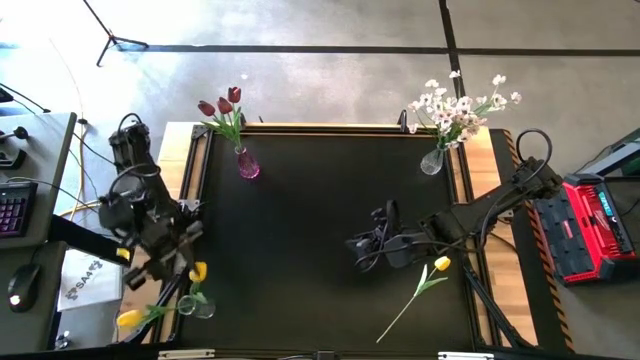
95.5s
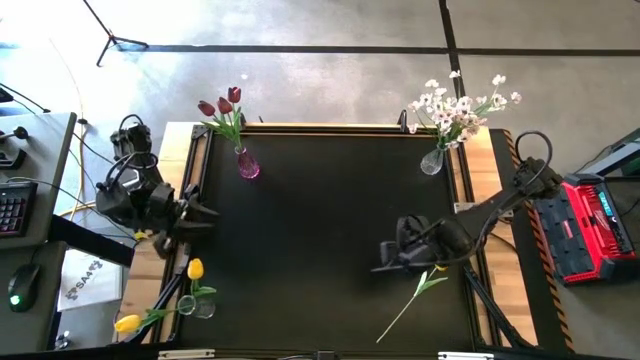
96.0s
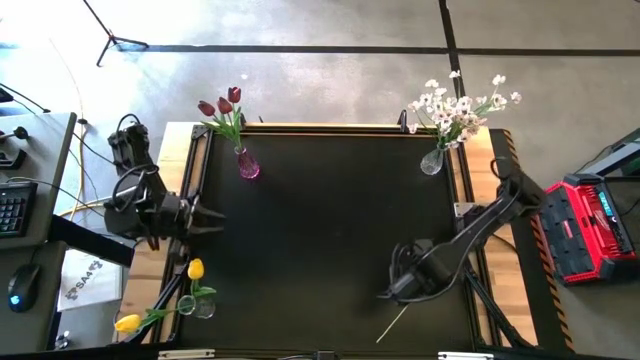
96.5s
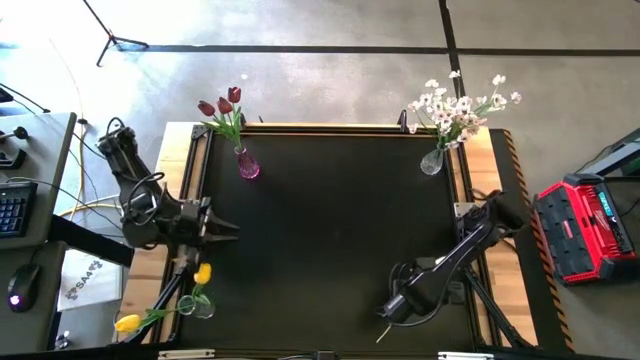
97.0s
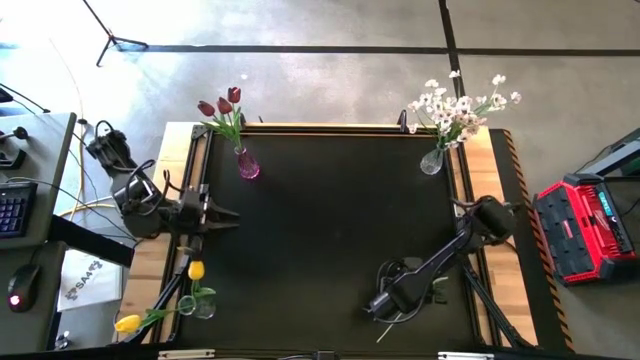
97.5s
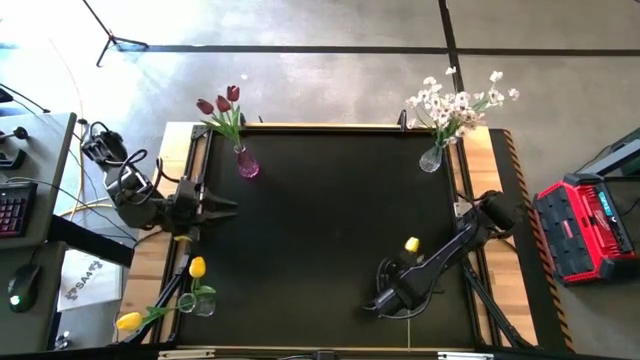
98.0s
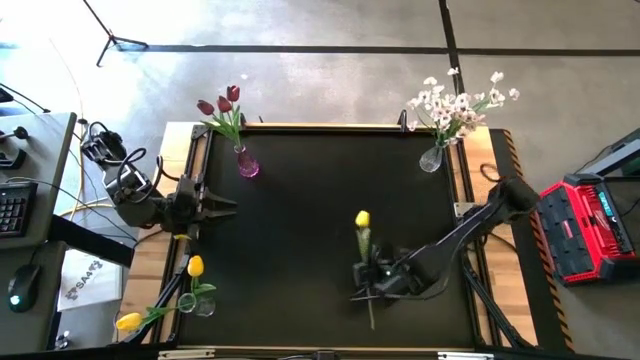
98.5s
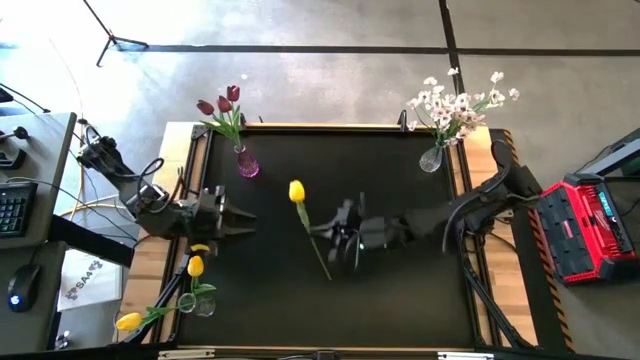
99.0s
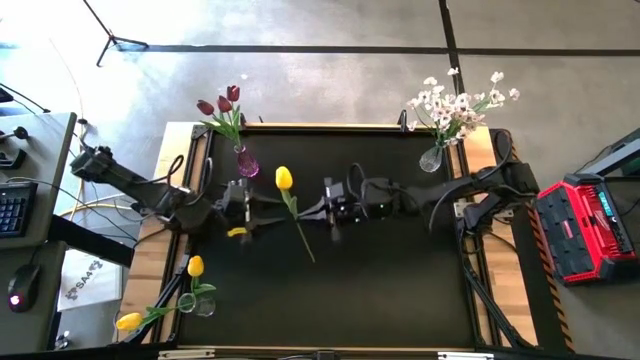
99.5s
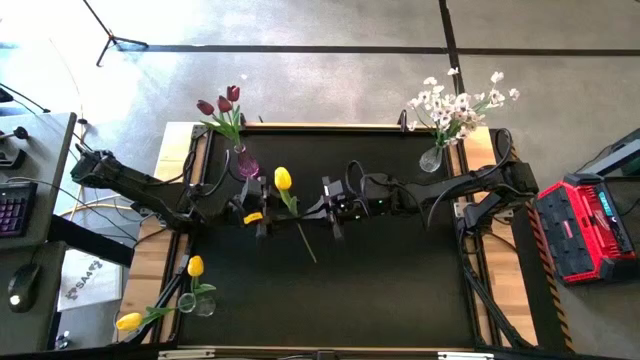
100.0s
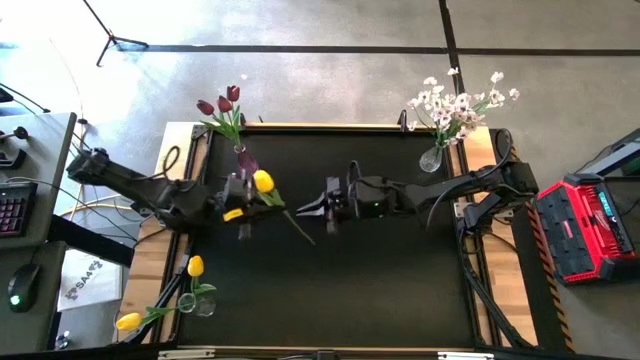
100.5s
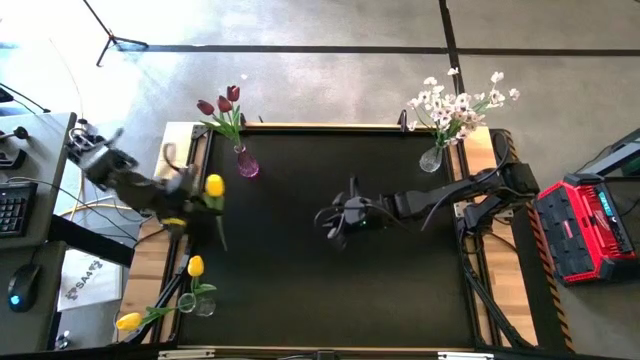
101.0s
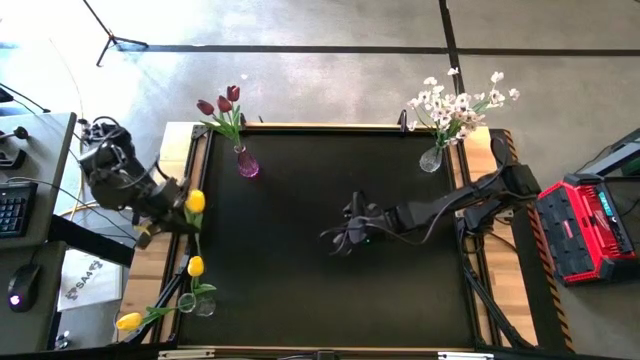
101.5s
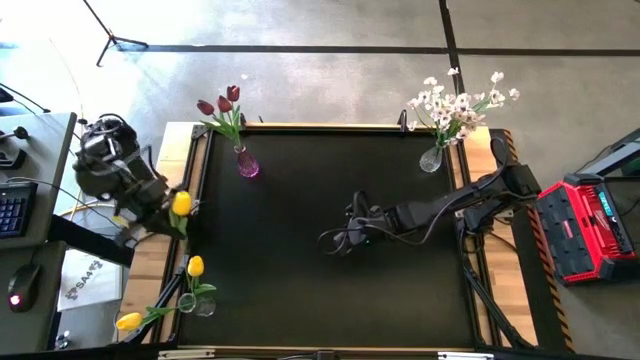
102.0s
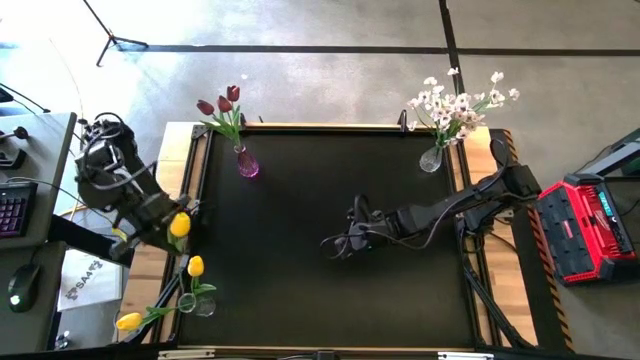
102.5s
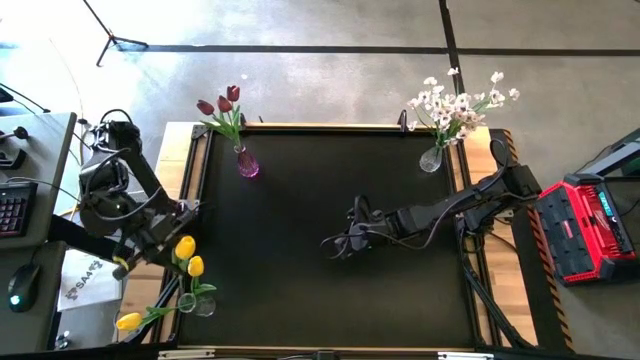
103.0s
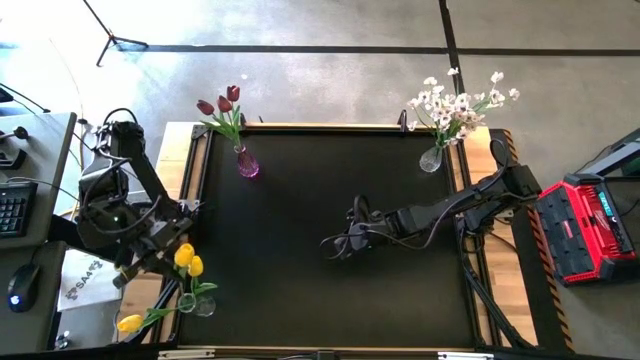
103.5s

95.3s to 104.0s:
Task: Sort flowers into vase by color
Put the yellow tulip flower into the bottom left transparent vase

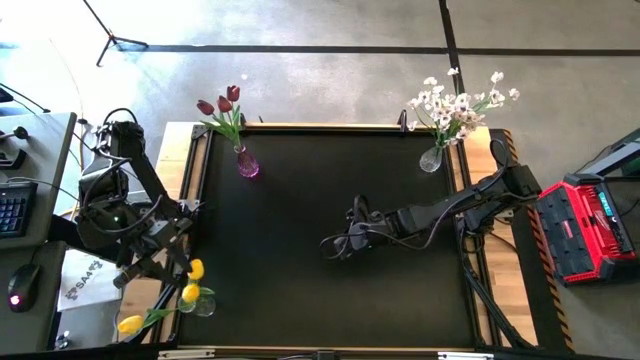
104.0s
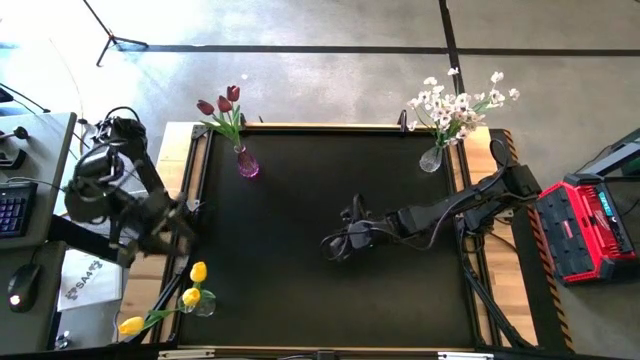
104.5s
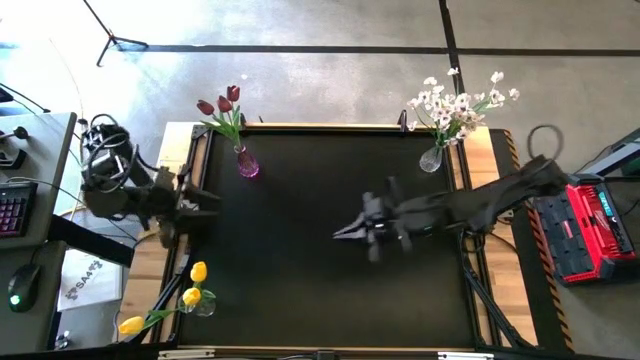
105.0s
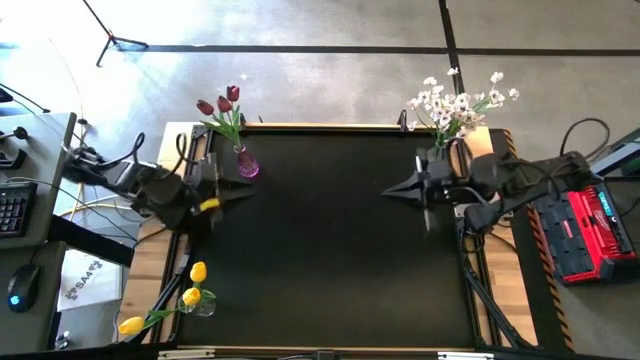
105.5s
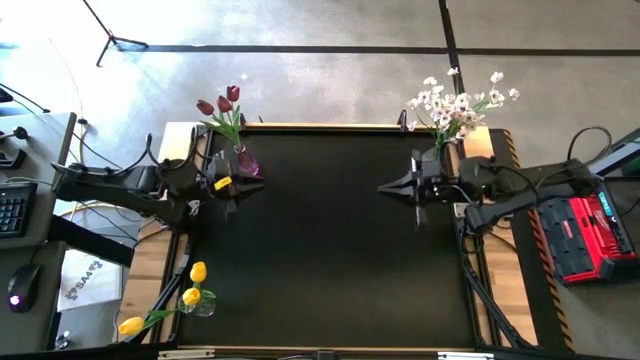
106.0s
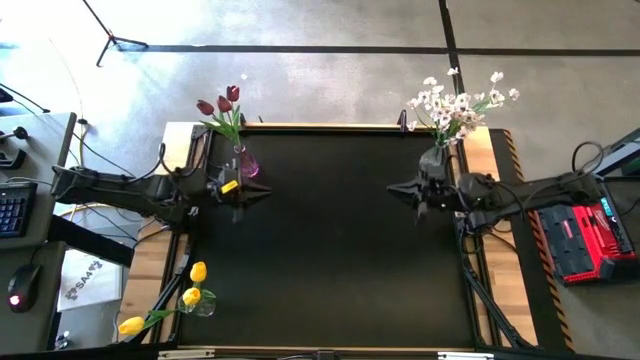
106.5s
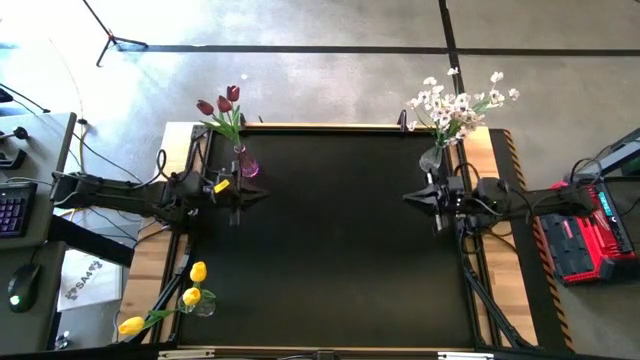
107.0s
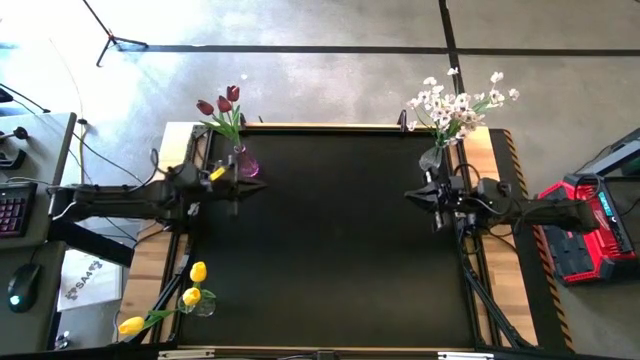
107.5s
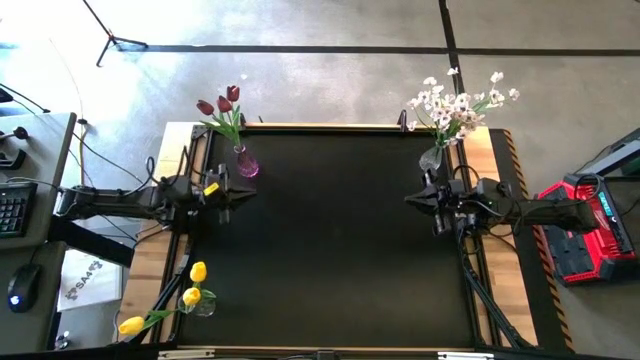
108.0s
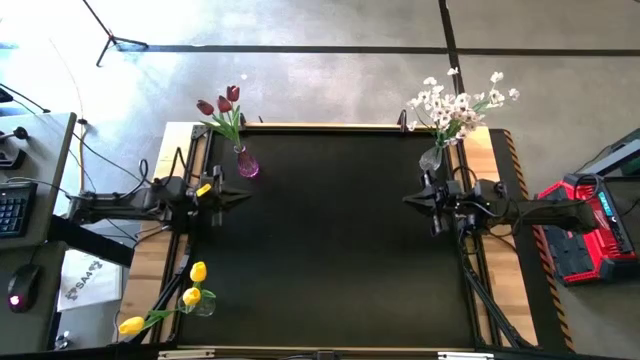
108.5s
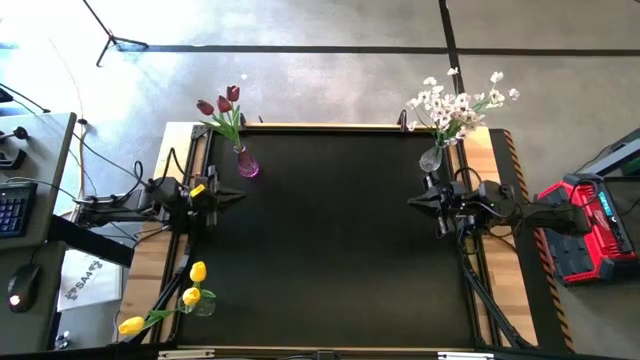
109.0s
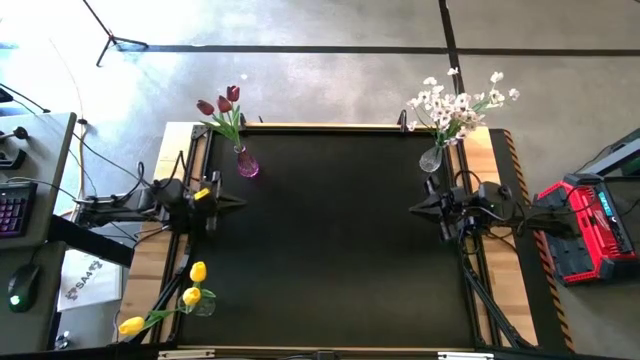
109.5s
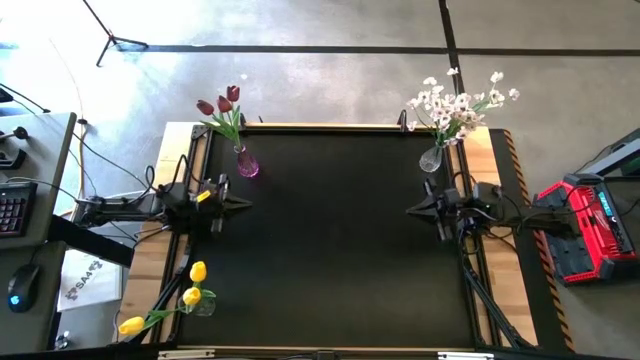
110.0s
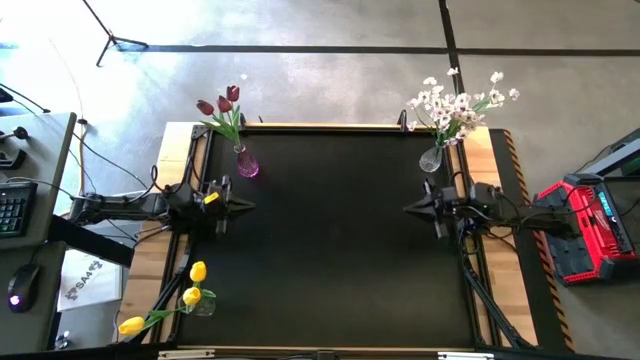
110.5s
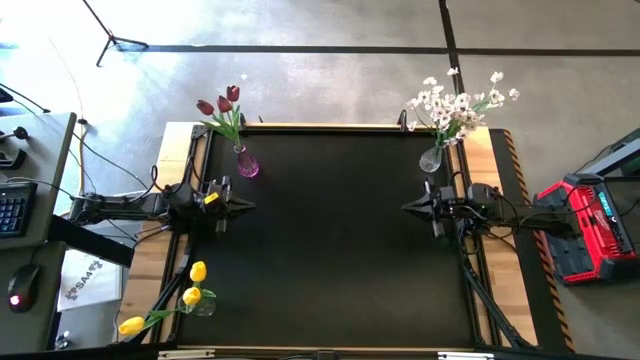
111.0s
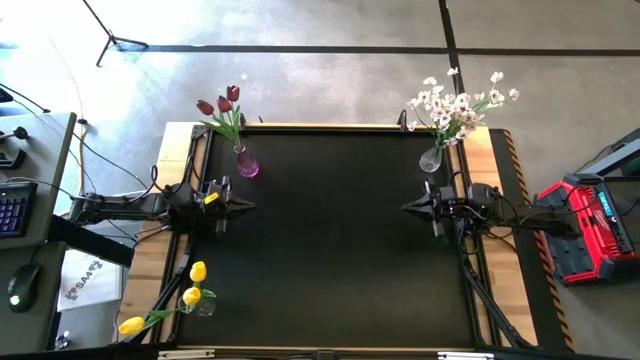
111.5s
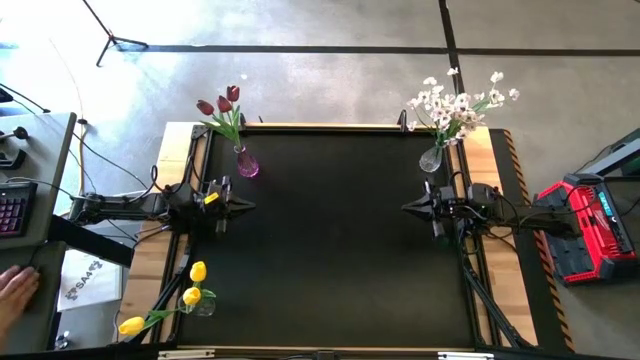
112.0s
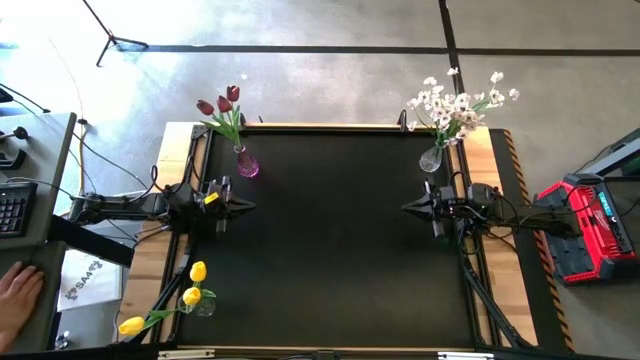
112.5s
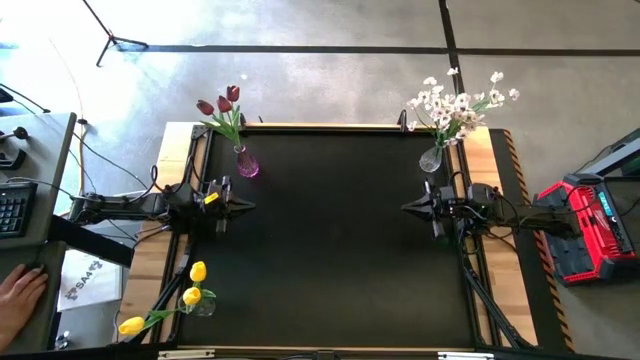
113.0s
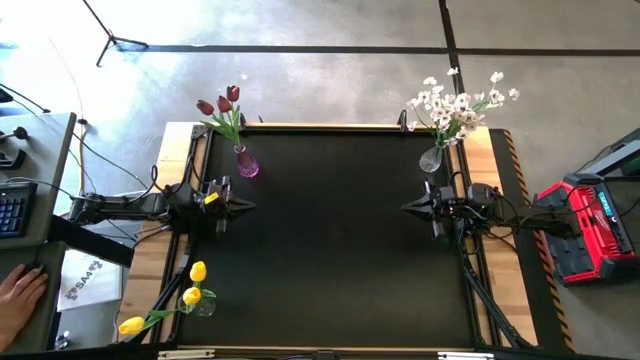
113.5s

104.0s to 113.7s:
Return to Home Position

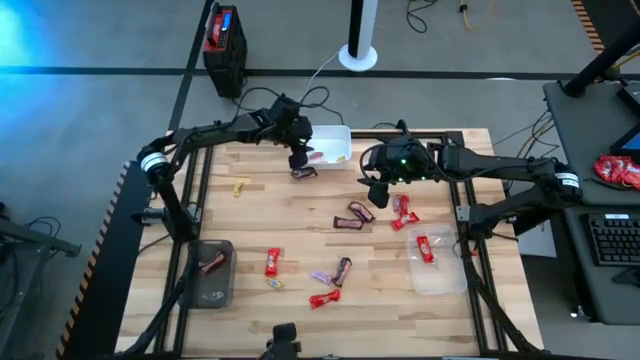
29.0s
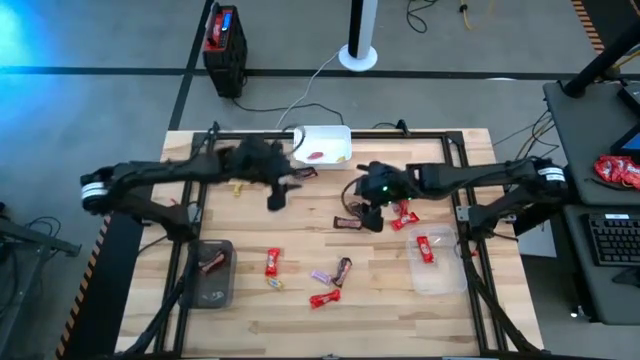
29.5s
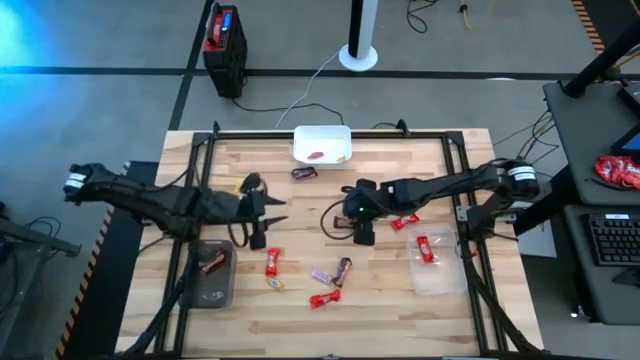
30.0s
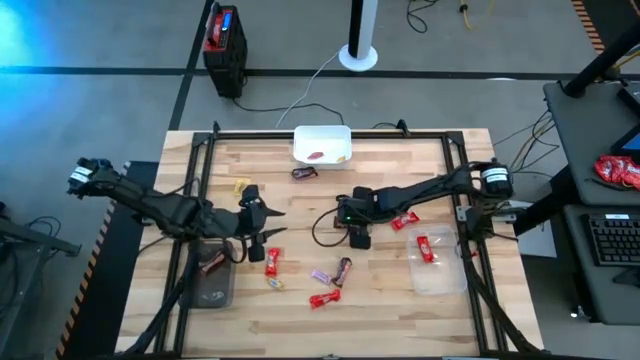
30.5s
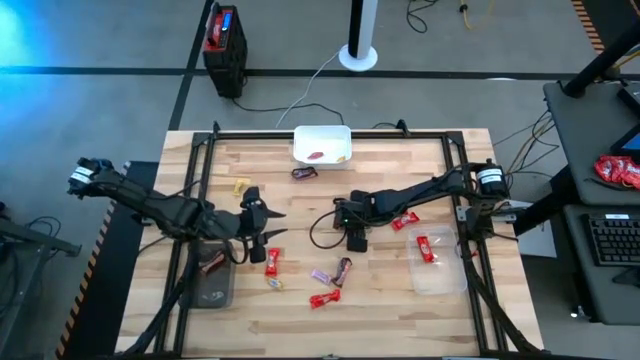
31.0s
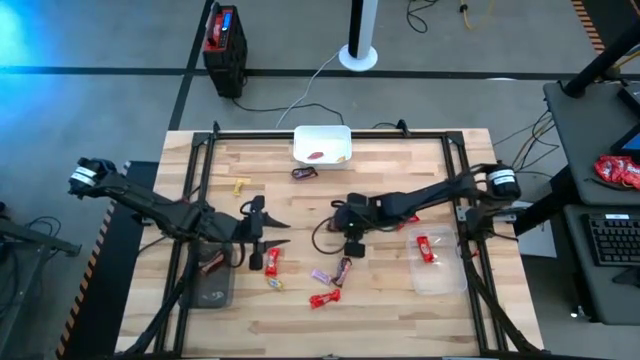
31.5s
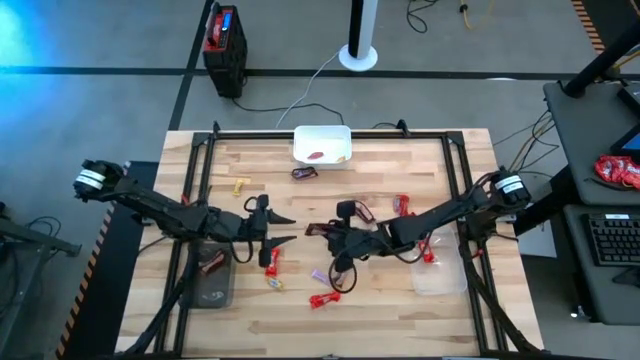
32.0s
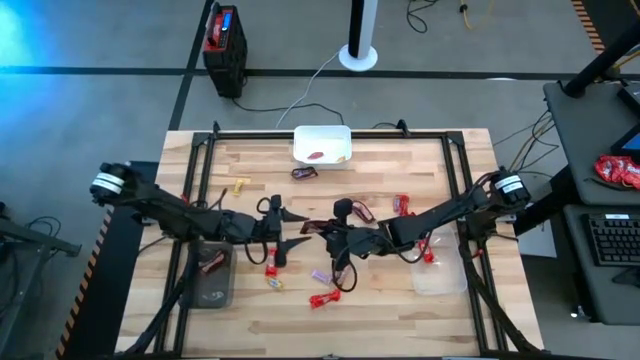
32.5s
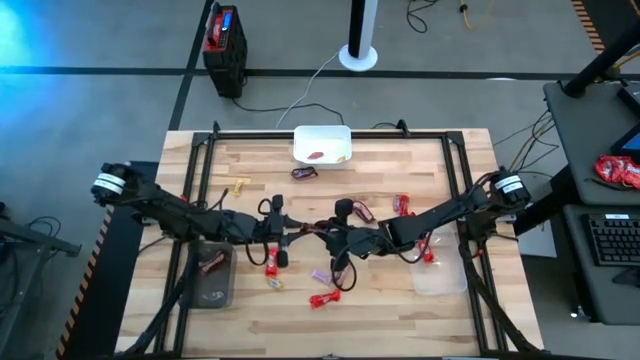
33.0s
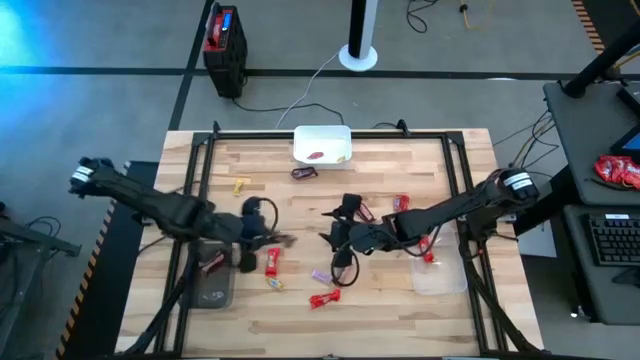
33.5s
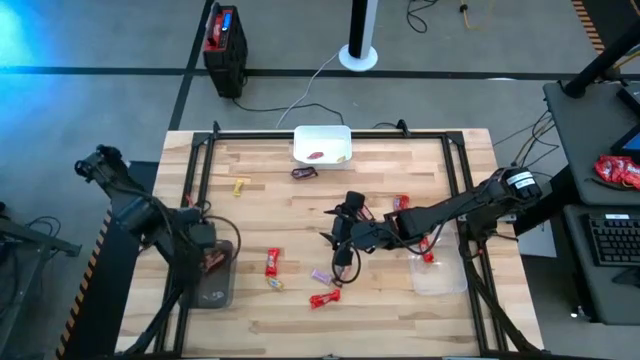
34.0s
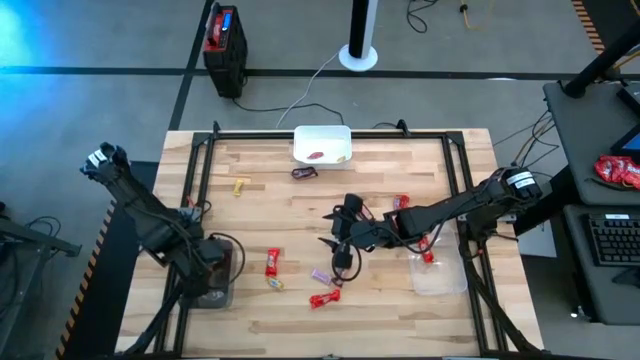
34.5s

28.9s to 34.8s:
Task: Sort candy by brand, put in halloween buckets
Put the brown chocolate bar into the black bin
